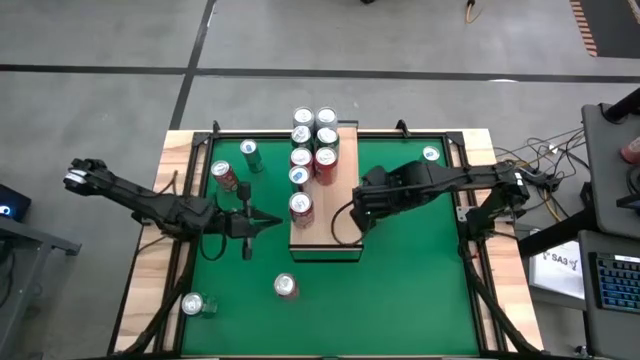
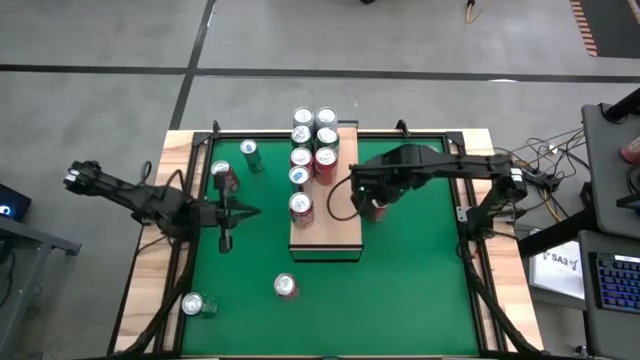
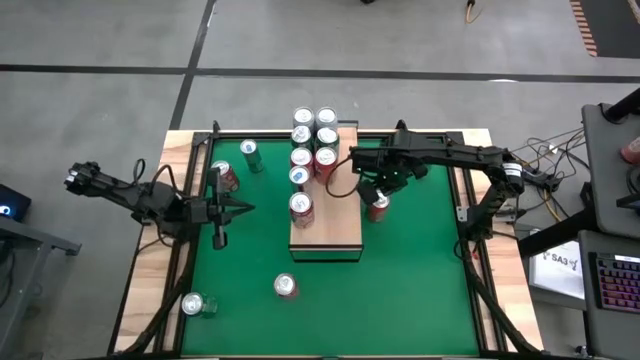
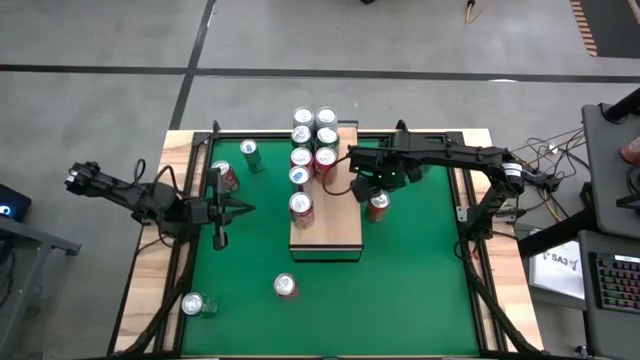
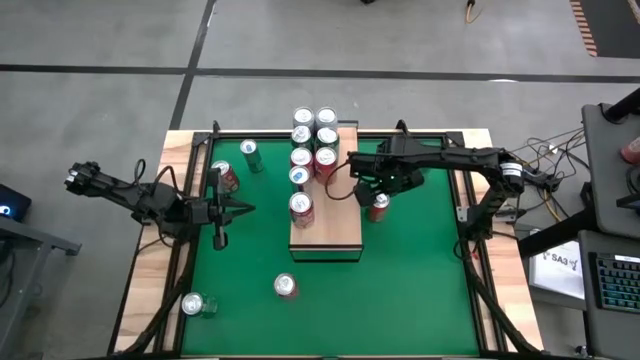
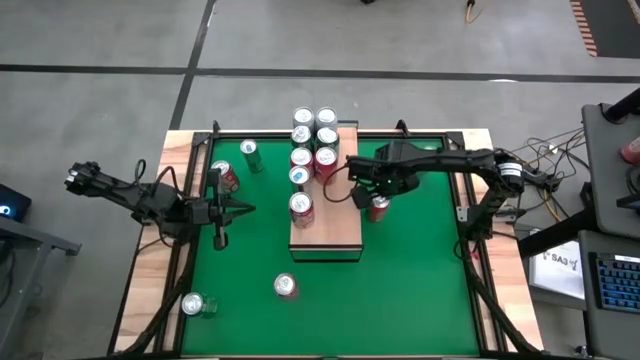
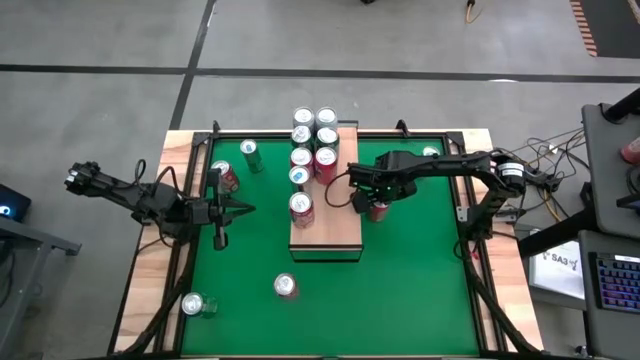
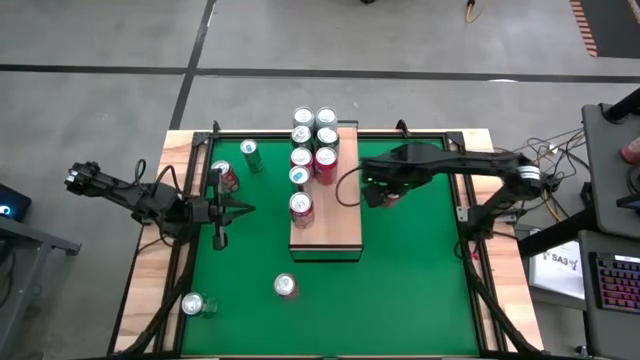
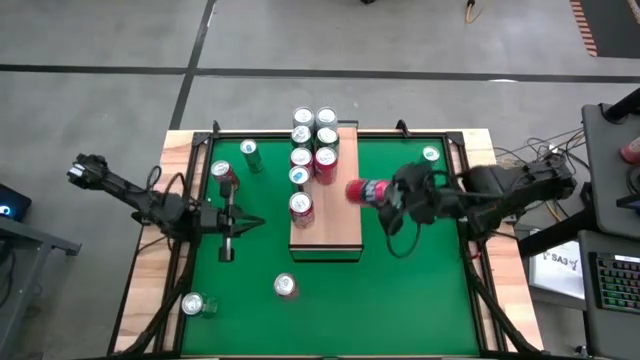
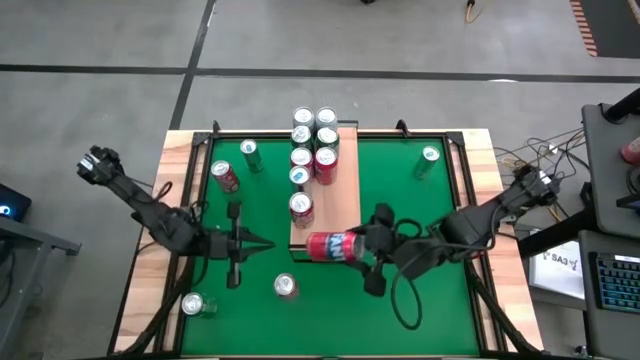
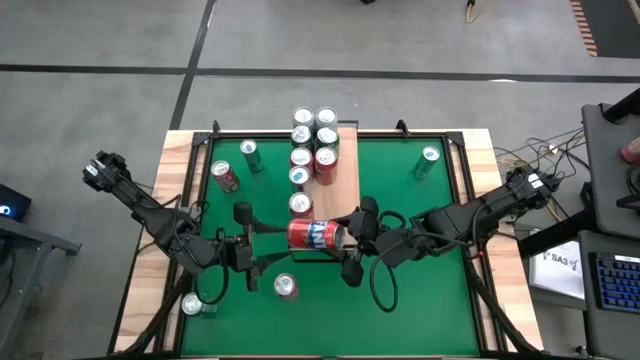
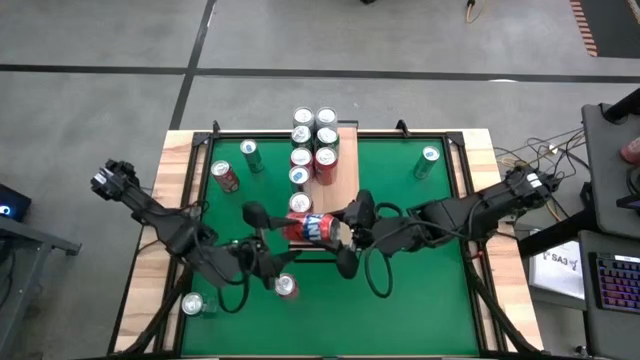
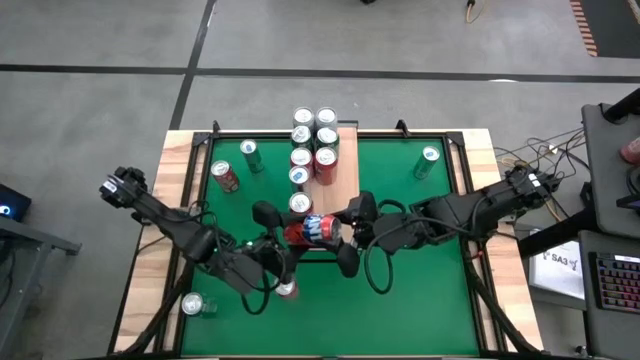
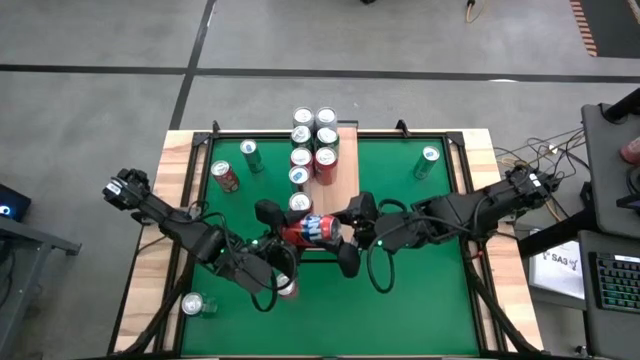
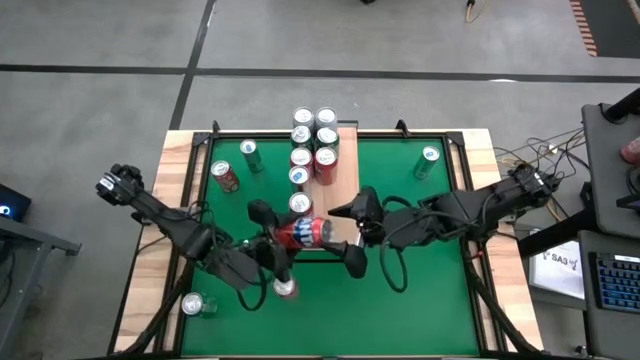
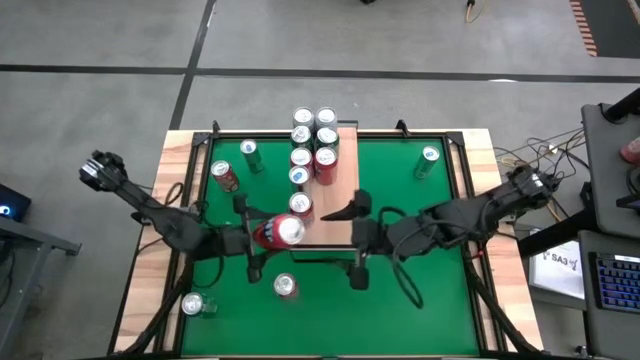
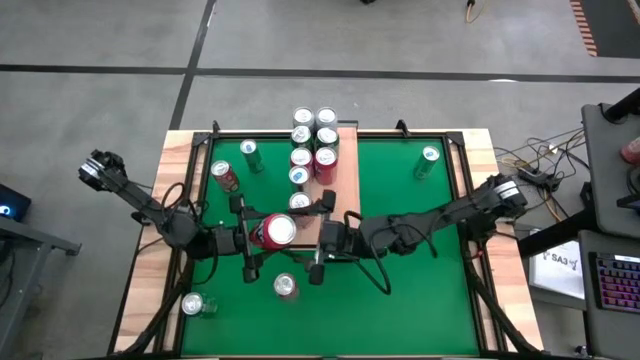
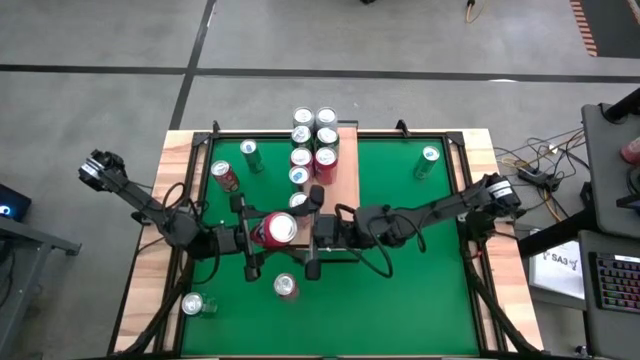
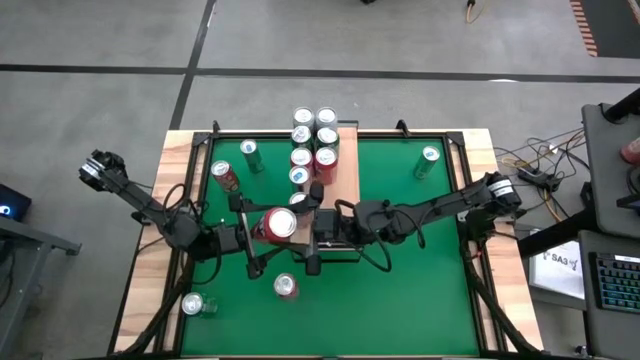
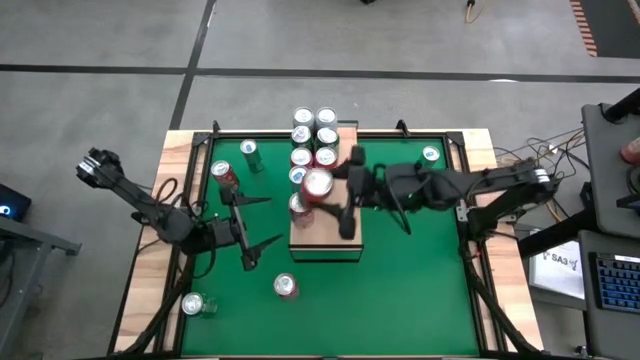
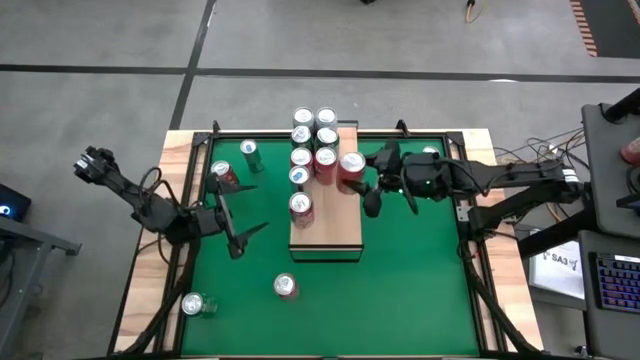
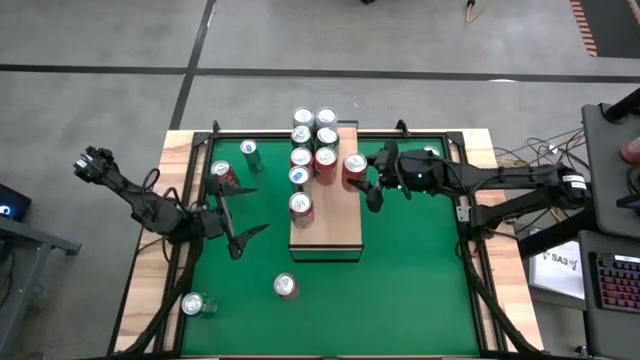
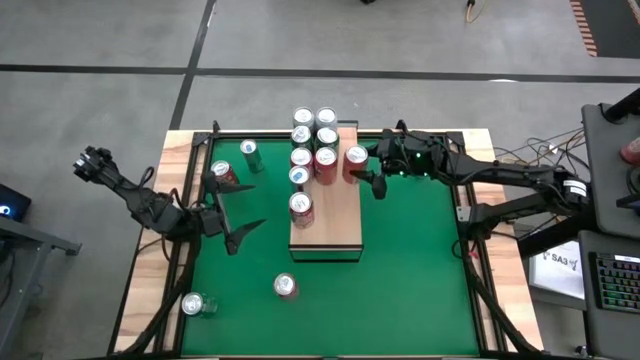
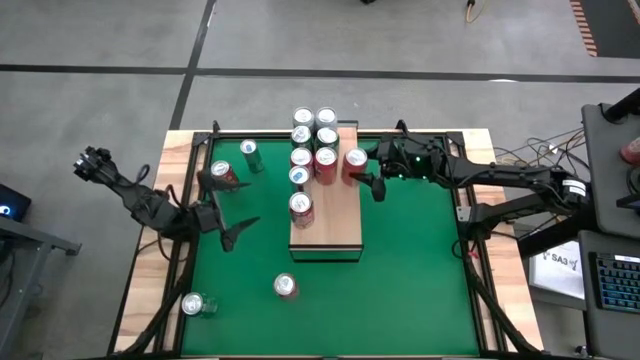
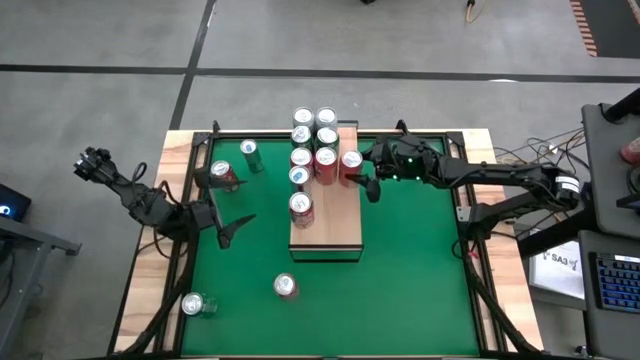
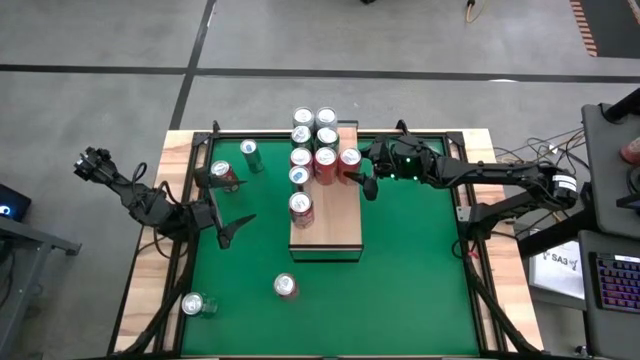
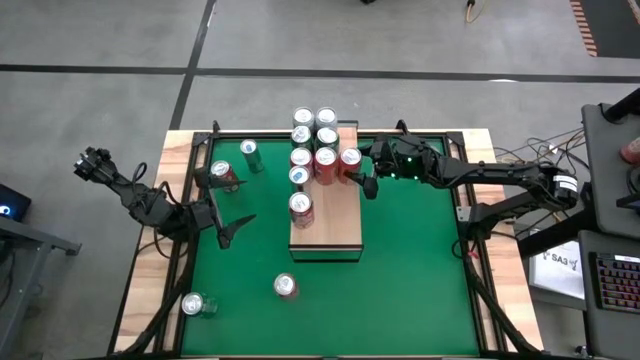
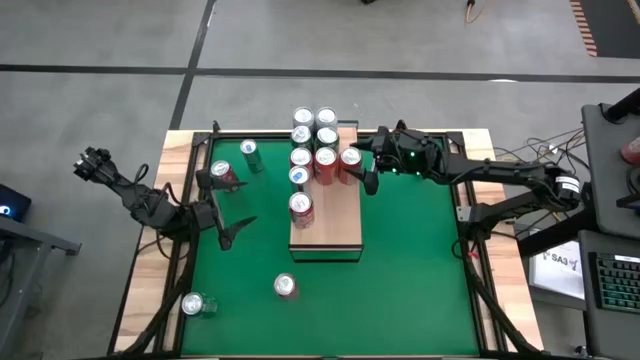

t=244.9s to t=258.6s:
Task: Place canned beverage on shelf
Put the orange can on the shelf

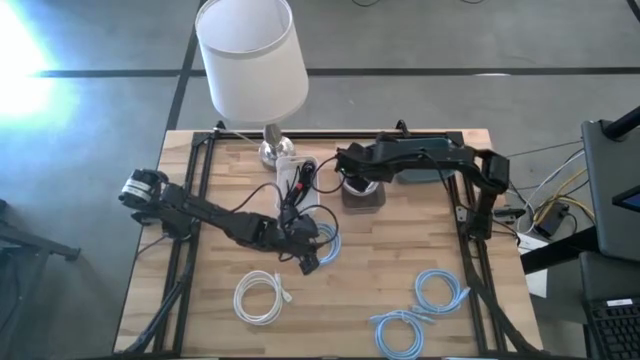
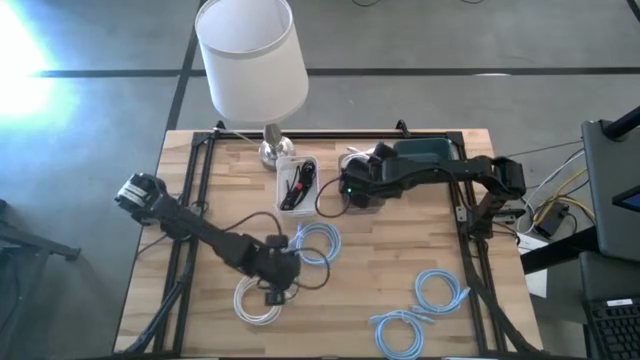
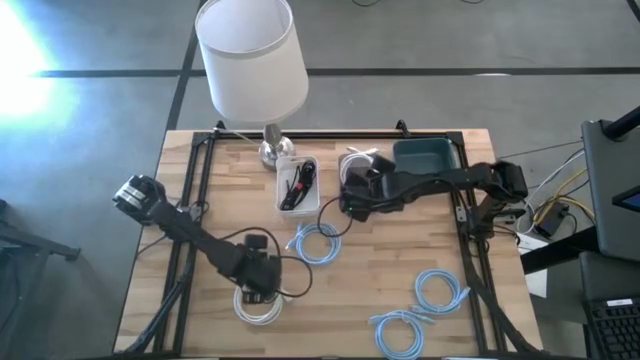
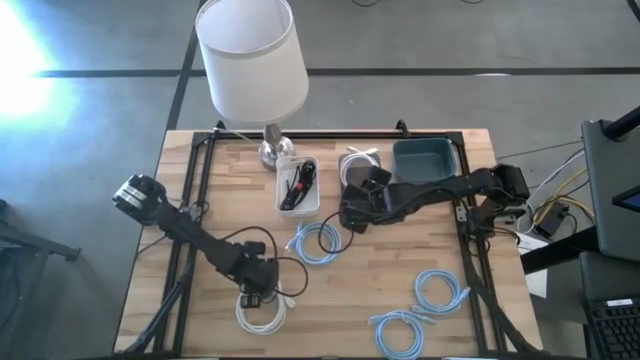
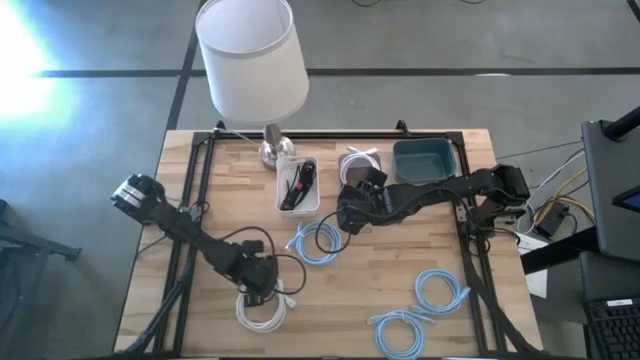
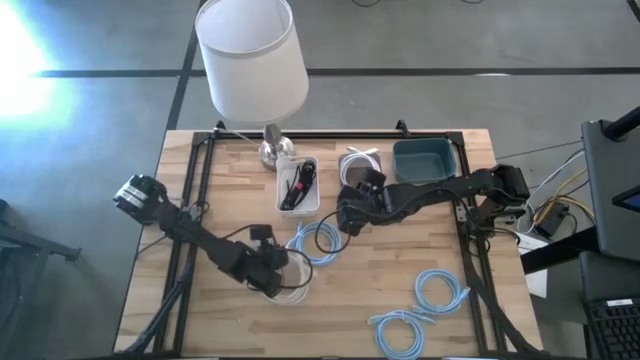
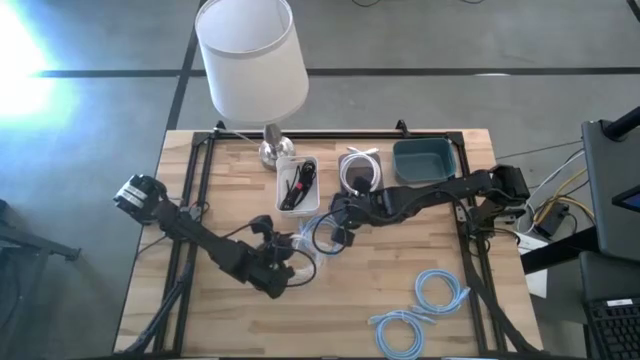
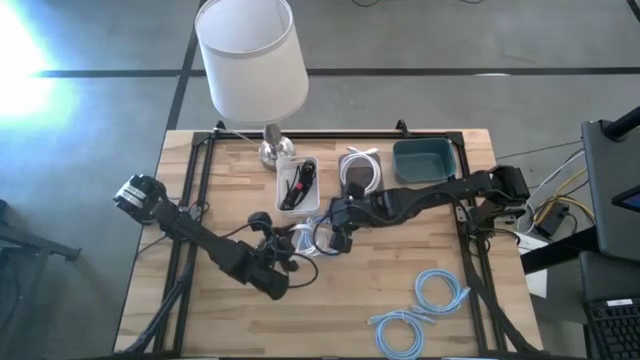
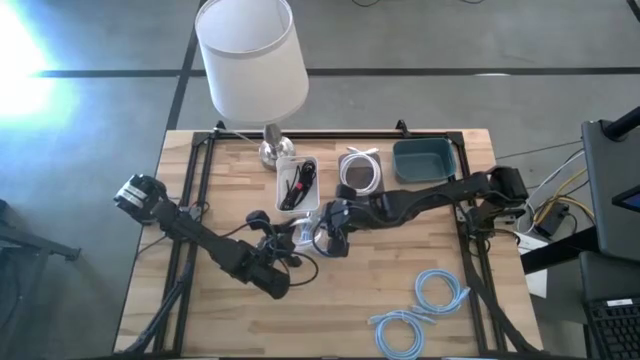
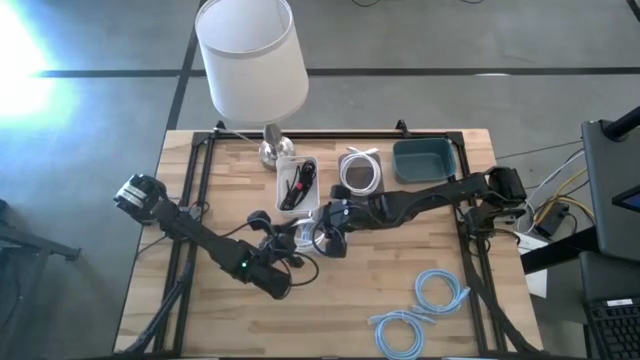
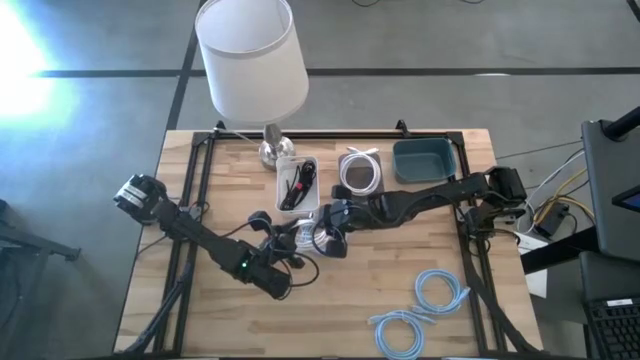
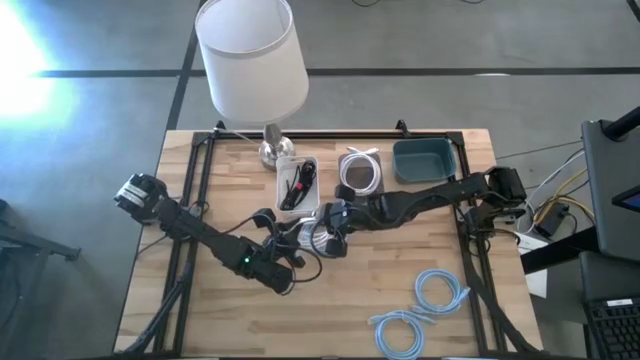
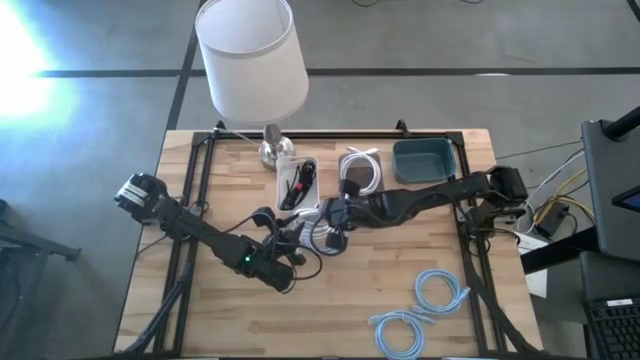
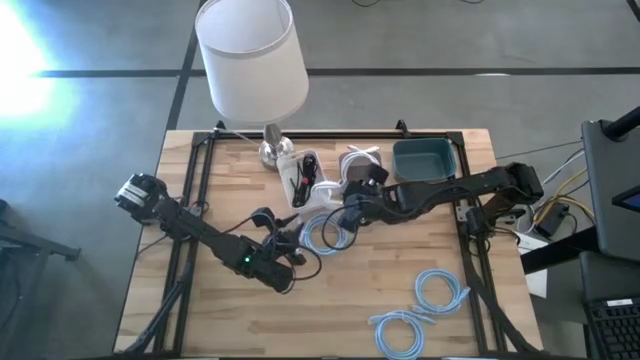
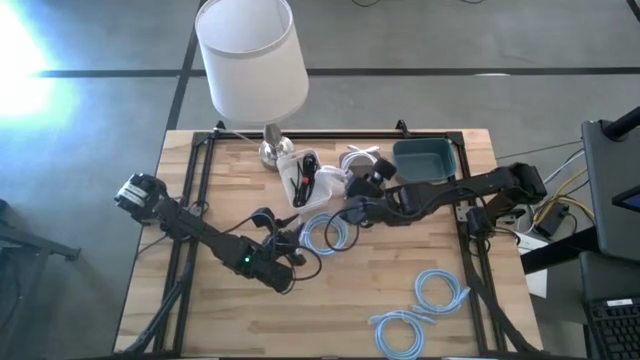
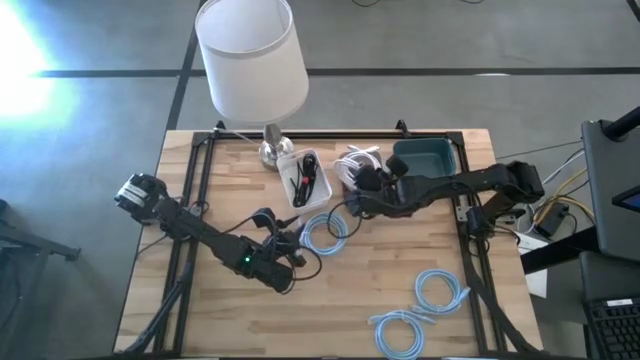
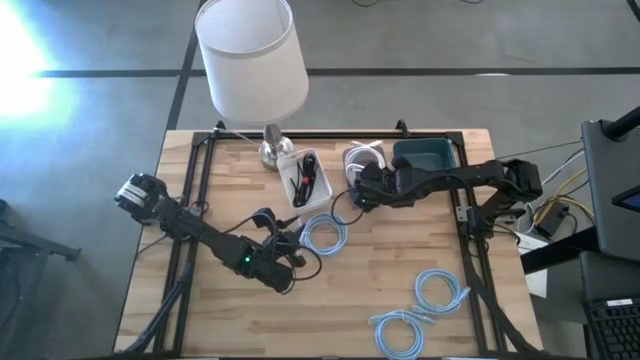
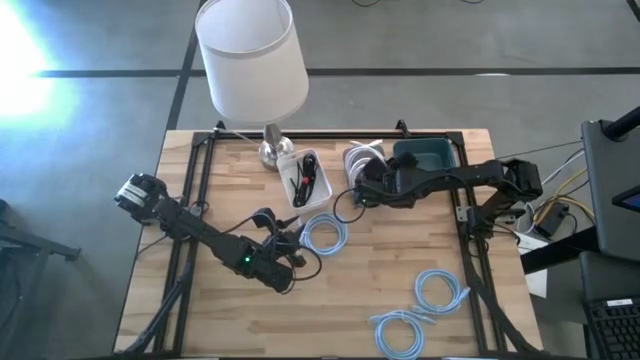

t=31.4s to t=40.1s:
Task: Pick & Place USB Port
Put the white HDMI cable into the black bin
